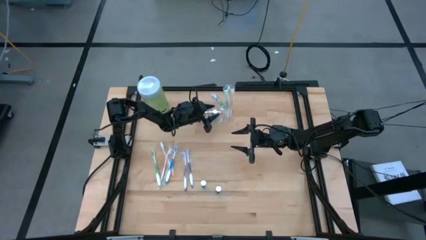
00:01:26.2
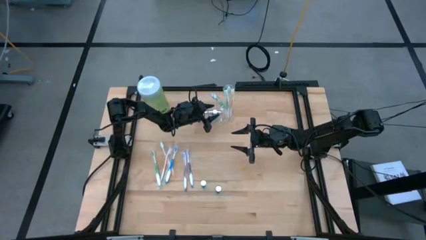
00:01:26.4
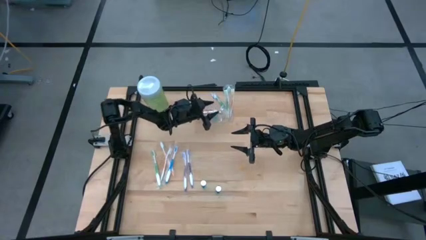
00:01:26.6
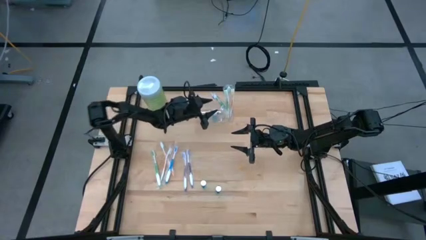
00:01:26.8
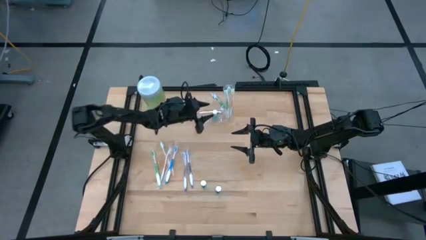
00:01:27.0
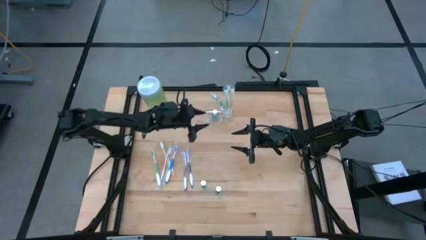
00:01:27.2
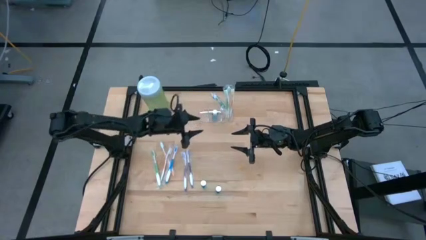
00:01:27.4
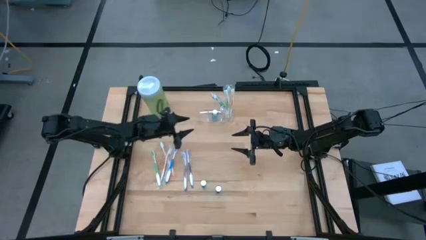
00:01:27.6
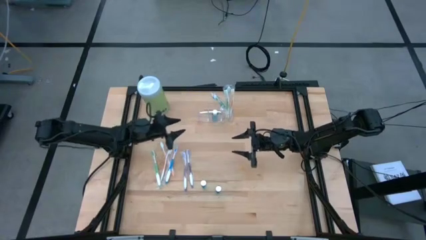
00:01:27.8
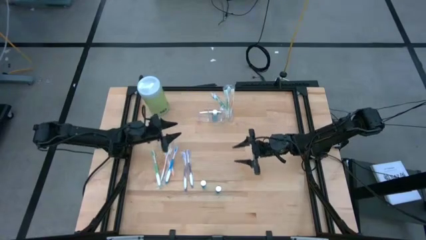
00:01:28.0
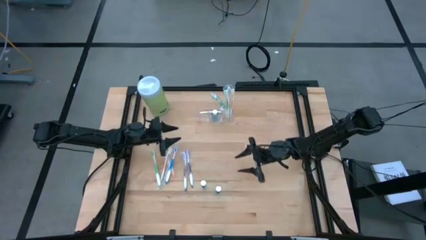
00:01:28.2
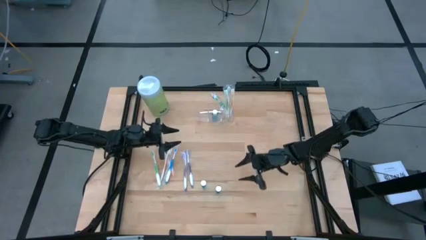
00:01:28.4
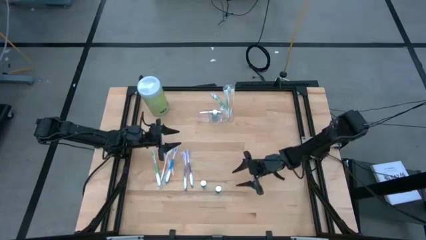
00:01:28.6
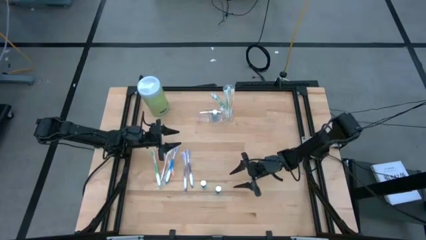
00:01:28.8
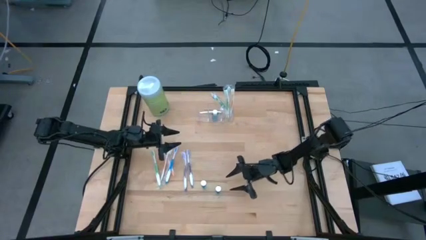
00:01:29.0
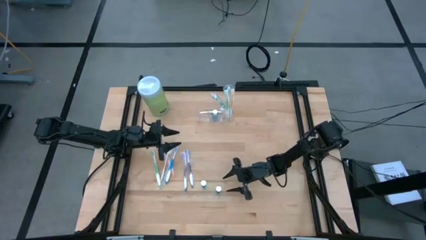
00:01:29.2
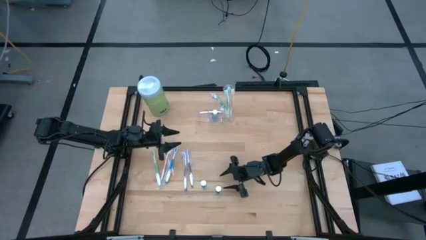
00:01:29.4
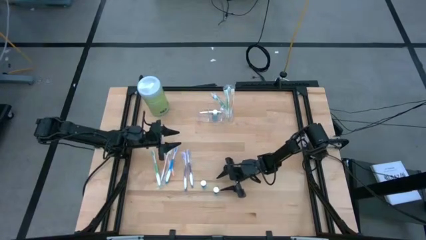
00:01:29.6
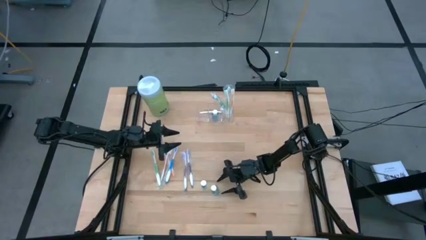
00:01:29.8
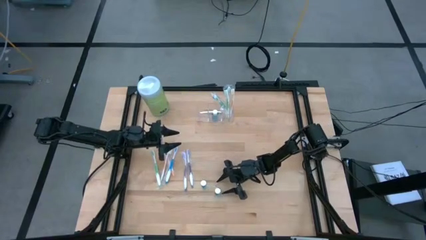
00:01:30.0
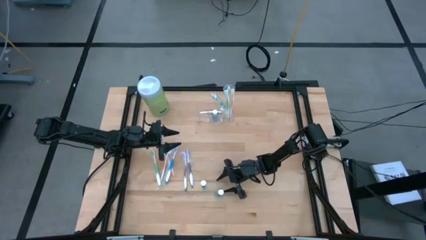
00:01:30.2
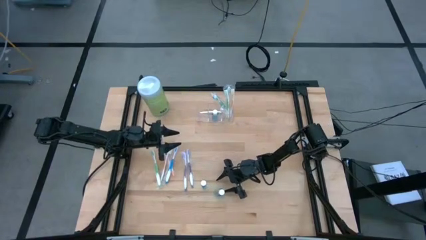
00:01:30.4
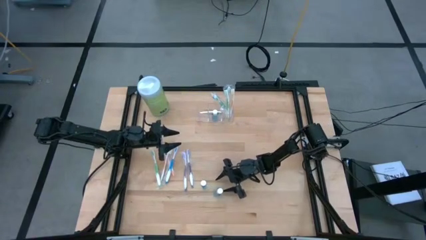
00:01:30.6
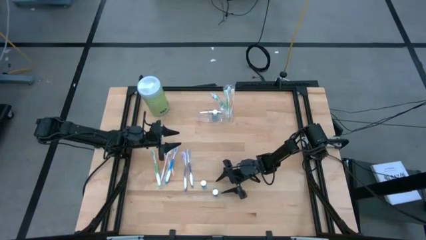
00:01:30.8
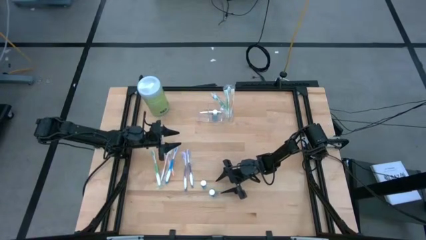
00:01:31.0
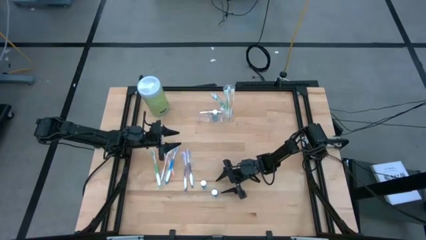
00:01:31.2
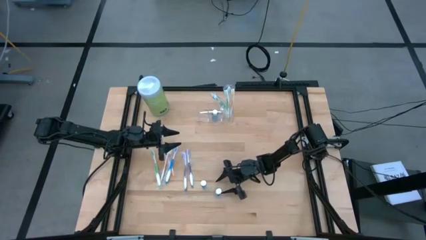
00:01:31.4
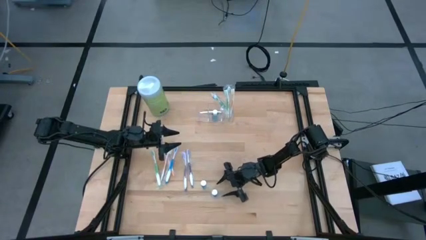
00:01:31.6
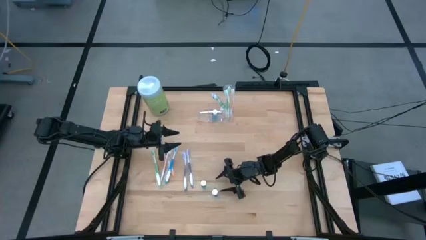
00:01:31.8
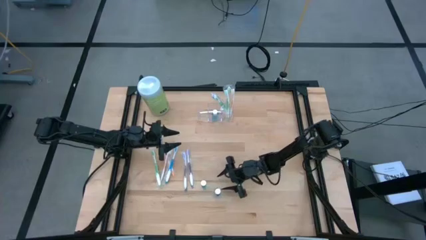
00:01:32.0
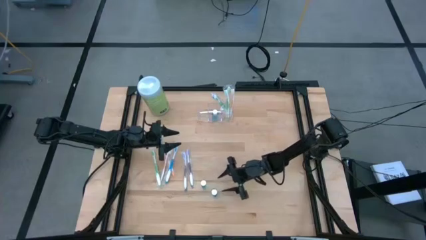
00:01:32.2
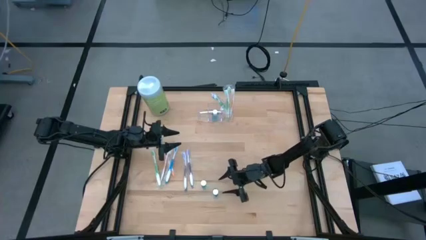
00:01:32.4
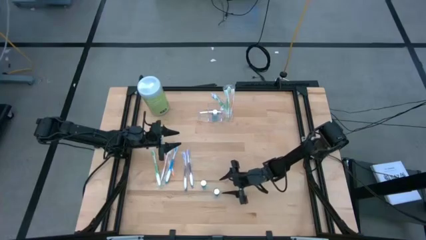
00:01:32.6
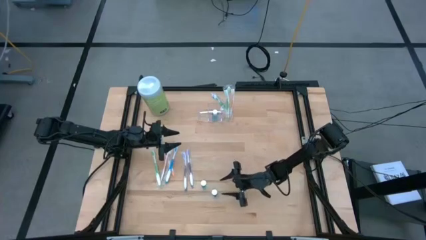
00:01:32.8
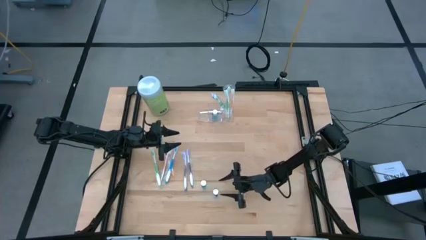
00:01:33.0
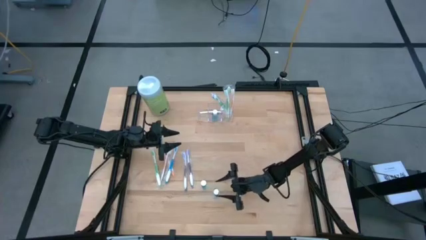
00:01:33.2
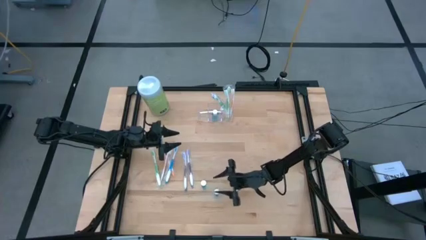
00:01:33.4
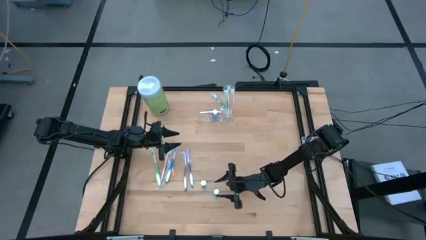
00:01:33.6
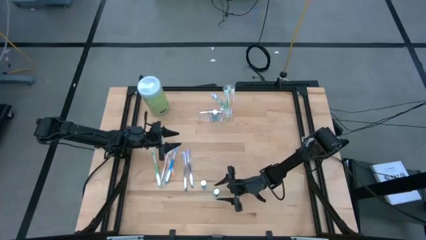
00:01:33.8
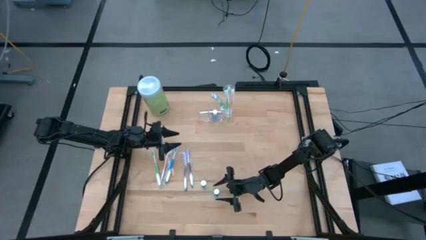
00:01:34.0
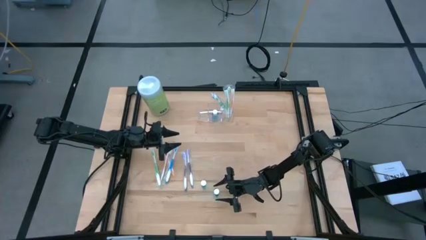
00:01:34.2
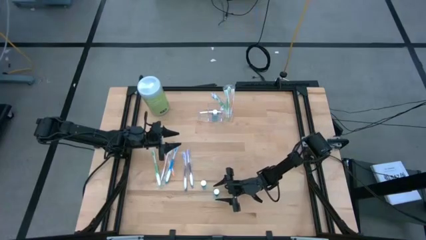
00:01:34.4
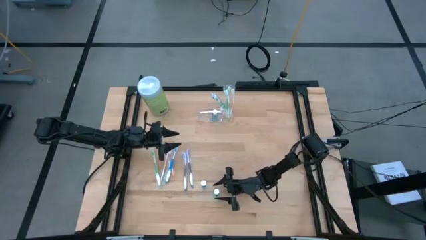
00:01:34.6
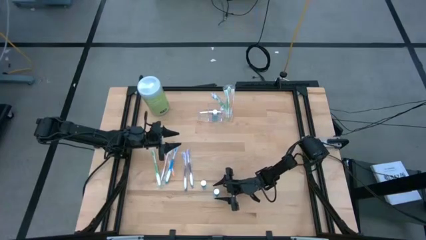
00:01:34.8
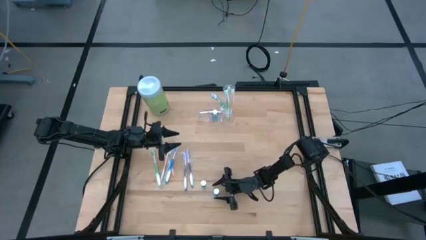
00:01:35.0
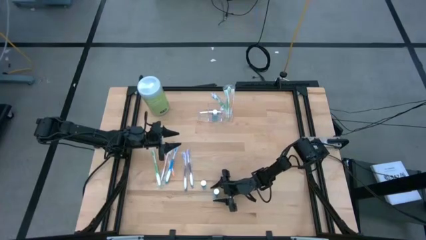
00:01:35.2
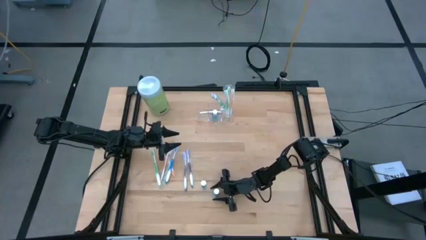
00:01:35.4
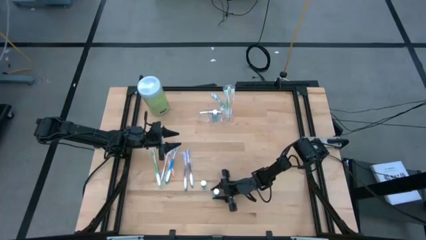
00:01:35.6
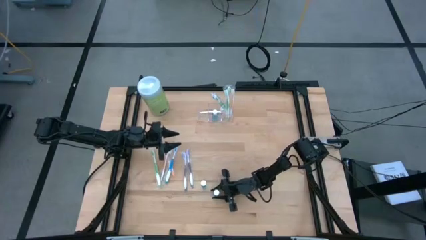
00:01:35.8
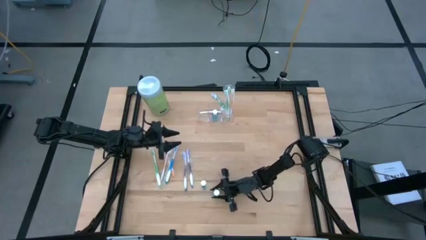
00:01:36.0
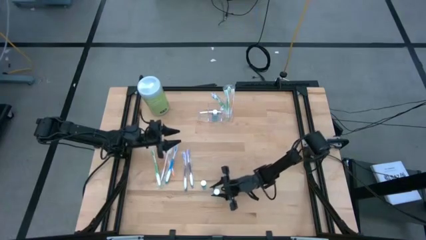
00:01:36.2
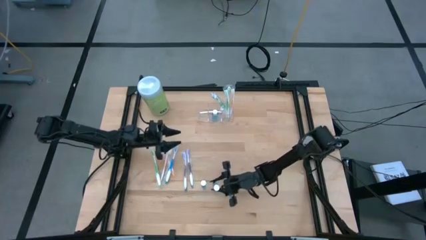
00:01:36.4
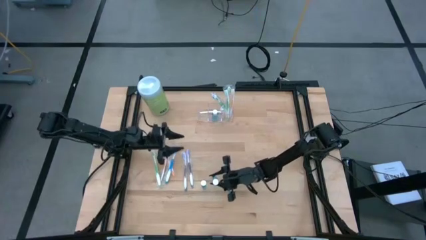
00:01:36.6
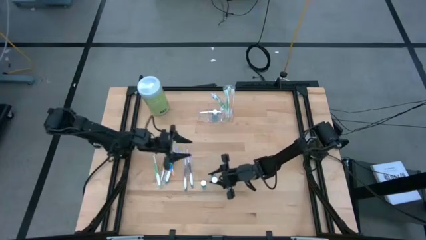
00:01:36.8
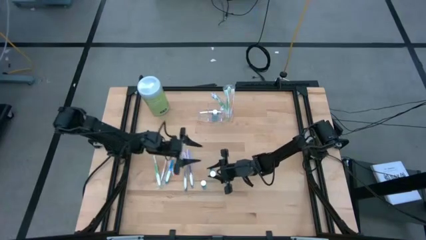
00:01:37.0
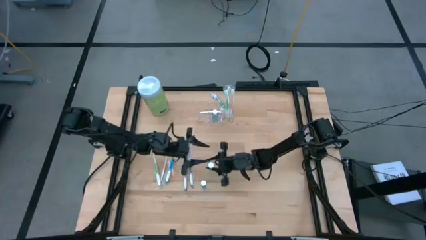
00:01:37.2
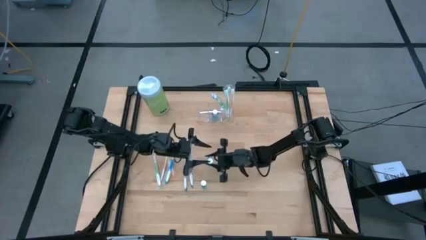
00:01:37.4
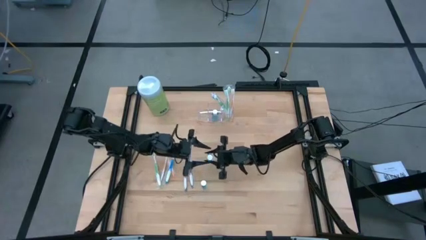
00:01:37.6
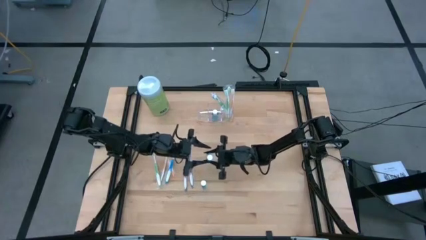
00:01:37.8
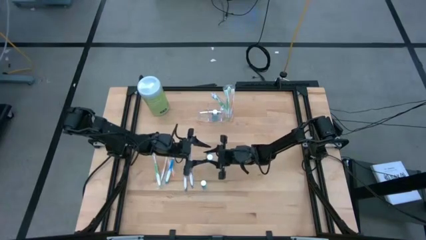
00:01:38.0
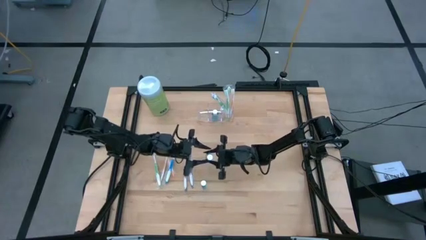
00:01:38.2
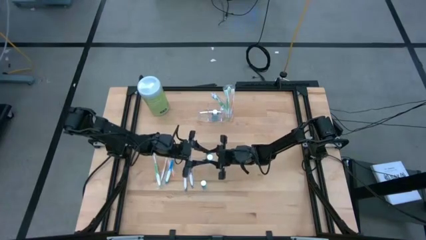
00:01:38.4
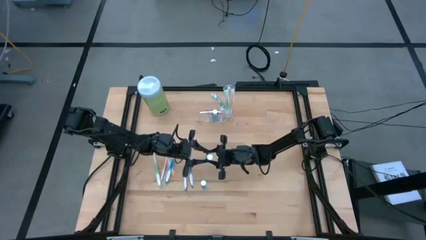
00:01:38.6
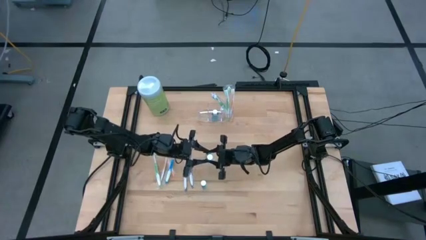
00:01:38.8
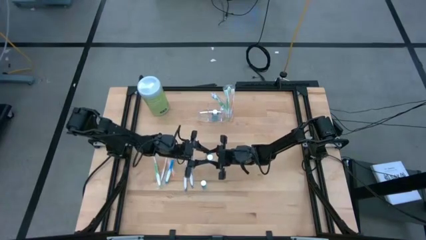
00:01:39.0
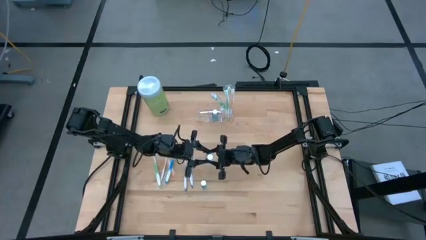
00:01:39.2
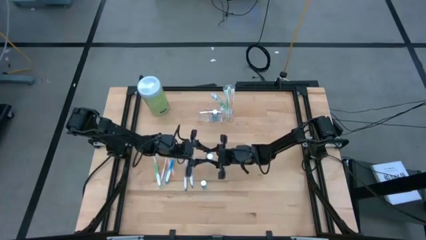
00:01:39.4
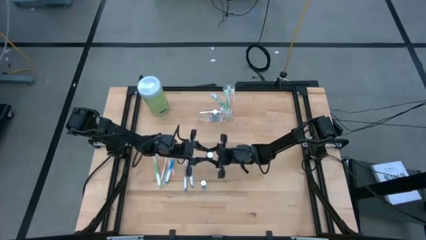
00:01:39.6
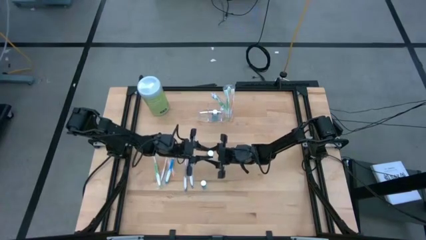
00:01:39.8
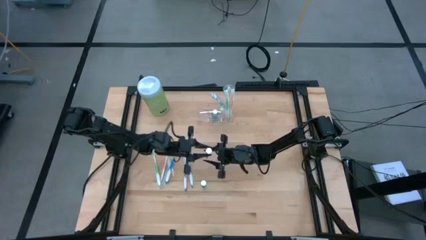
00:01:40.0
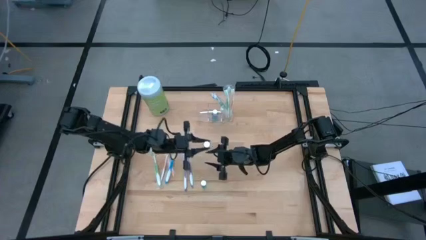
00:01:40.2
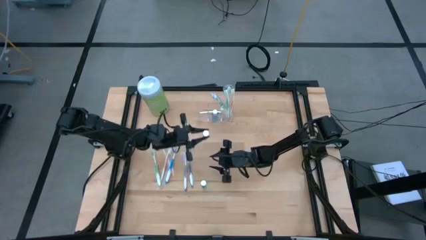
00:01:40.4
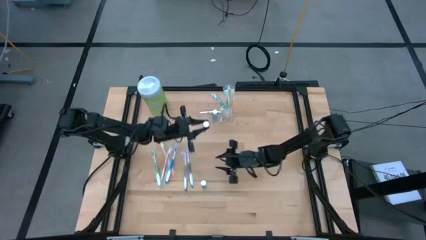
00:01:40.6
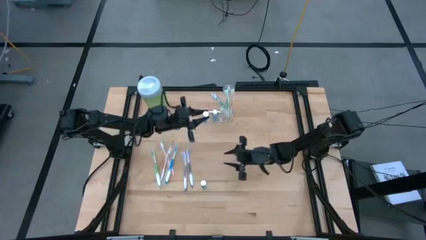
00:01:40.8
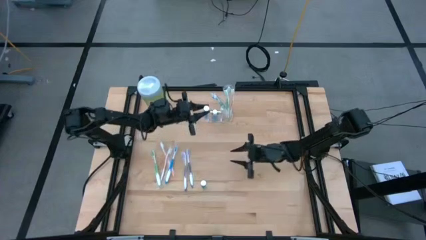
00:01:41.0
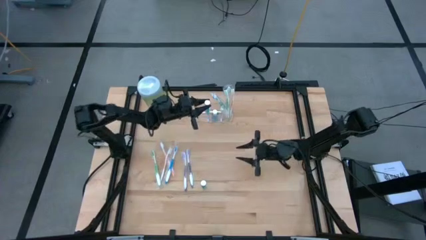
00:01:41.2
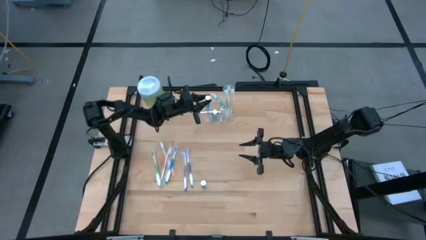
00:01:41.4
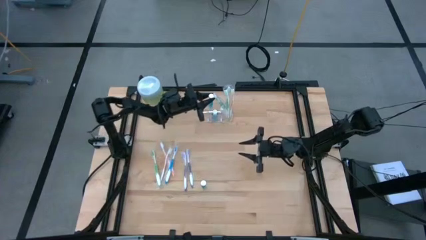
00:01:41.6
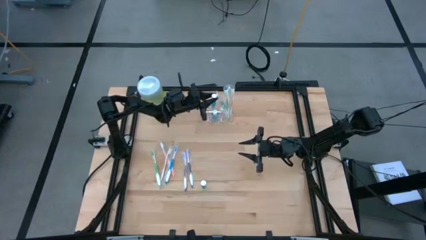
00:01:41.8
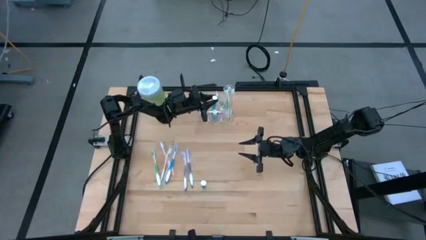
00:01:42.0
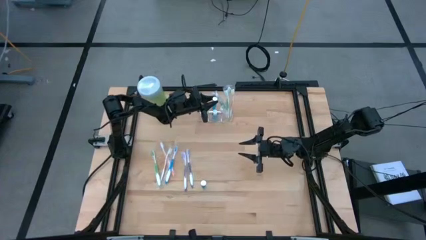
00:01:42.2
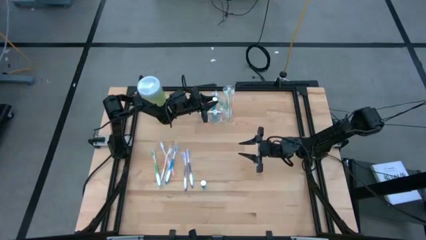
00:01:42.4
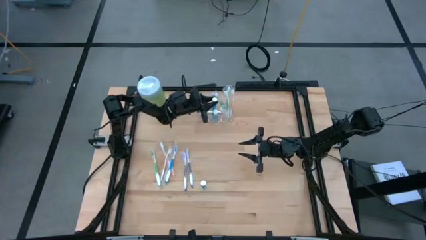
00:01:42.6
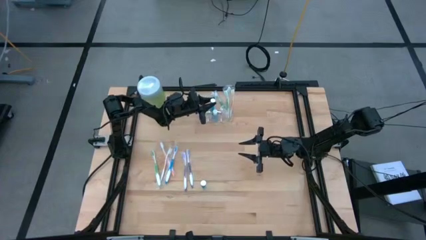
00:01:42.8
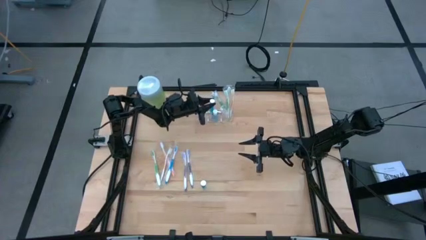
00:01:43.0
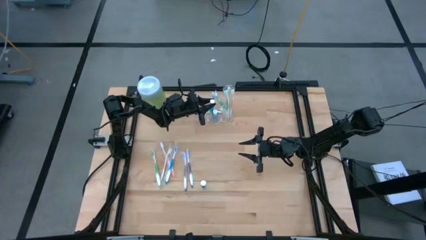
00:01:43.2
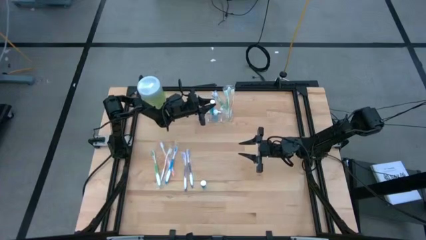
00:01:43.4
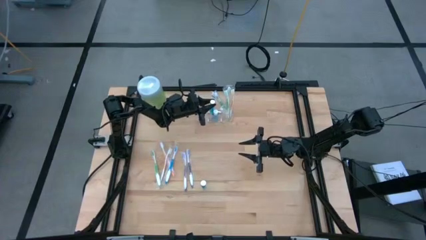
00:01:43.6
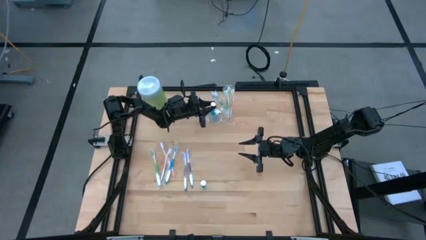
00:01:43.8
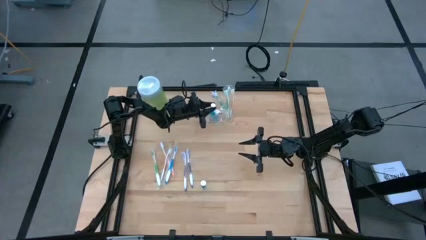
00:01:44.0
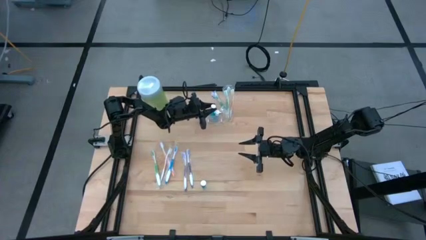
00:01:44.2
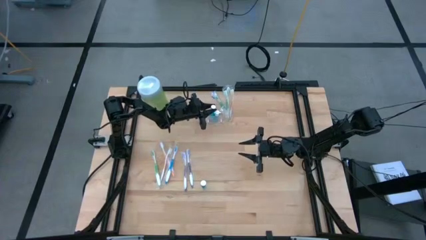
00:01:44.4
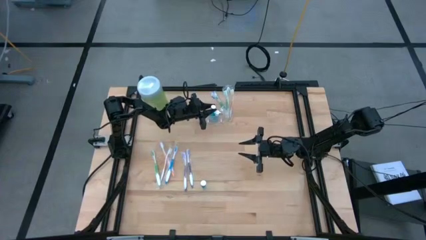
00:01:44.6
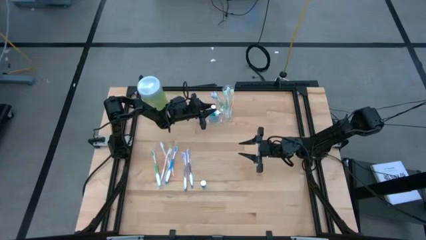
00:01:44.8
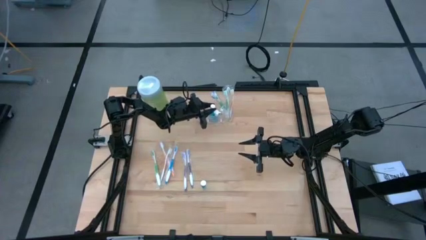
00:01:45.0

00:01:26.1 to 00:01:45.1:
Task: Pick & Place toothbrushing station
Put the blue mouthwash into the transparent organizer
